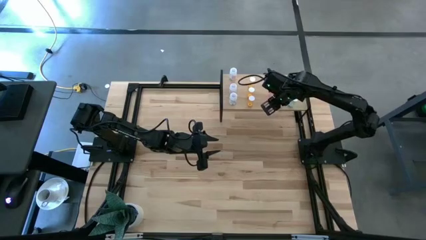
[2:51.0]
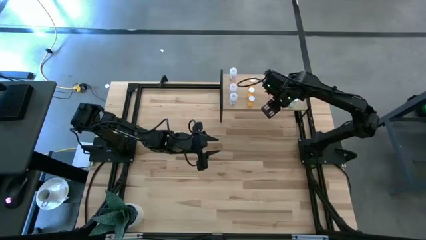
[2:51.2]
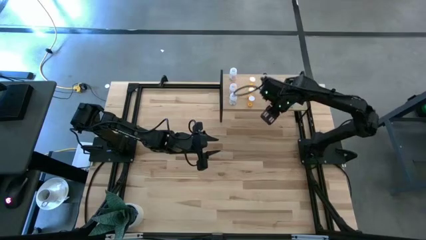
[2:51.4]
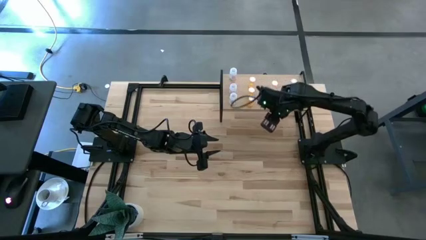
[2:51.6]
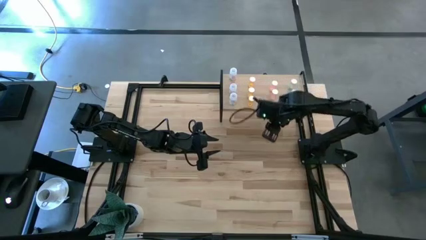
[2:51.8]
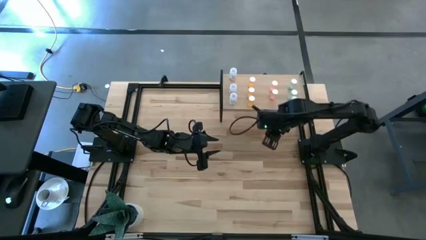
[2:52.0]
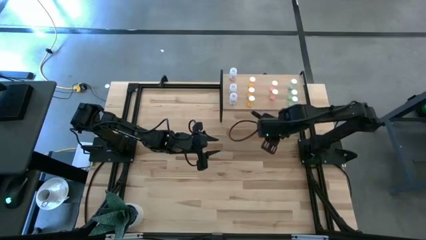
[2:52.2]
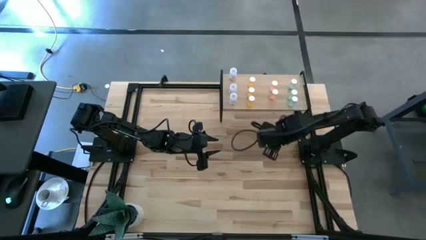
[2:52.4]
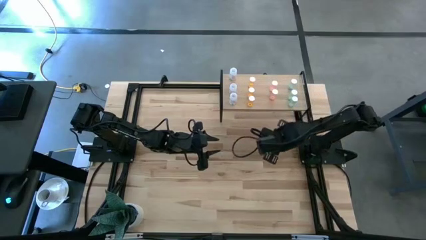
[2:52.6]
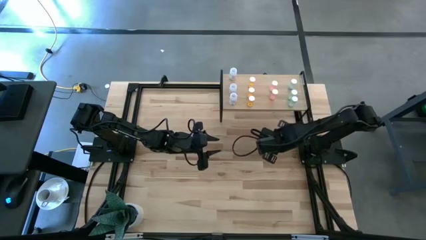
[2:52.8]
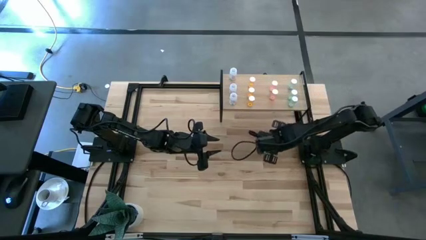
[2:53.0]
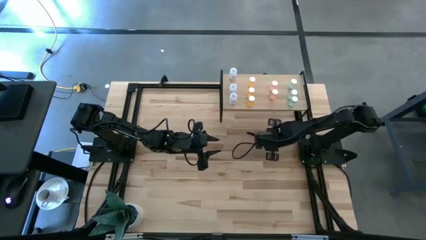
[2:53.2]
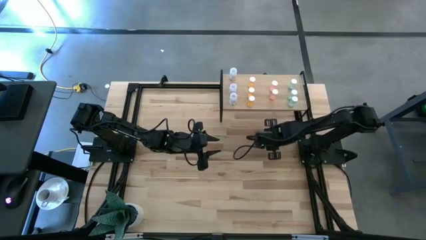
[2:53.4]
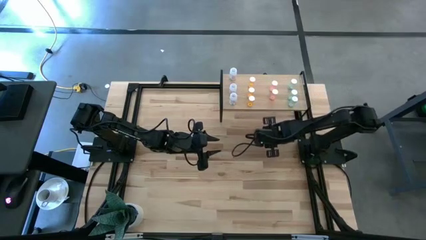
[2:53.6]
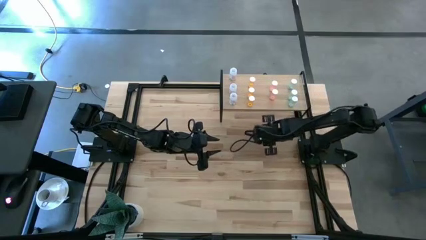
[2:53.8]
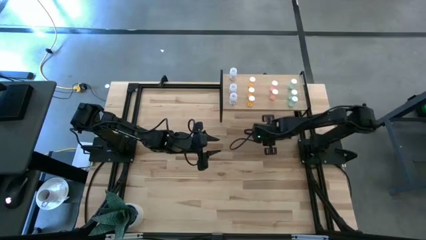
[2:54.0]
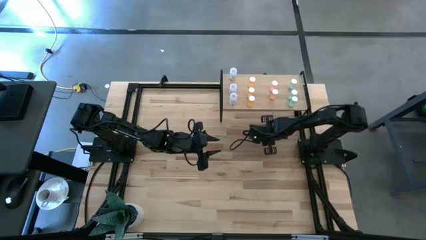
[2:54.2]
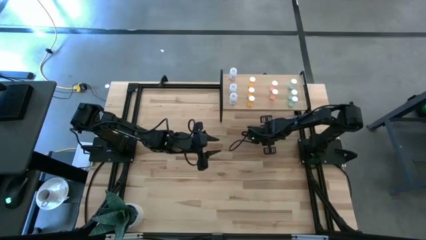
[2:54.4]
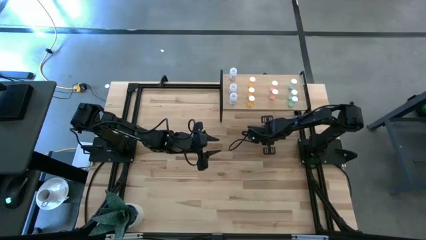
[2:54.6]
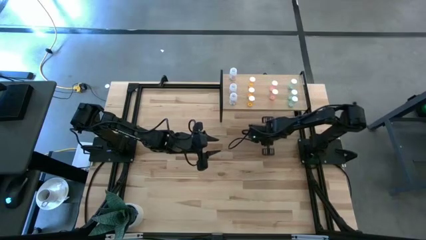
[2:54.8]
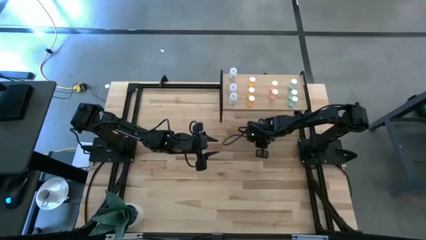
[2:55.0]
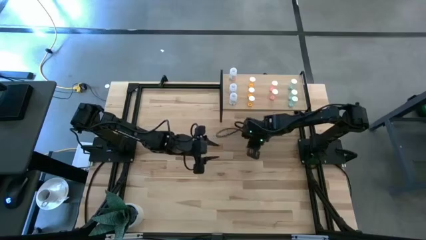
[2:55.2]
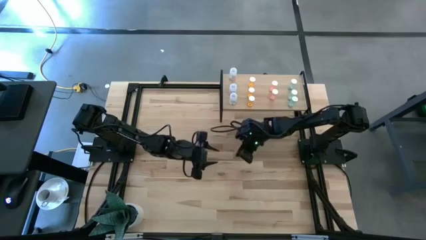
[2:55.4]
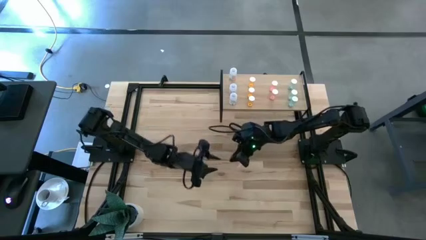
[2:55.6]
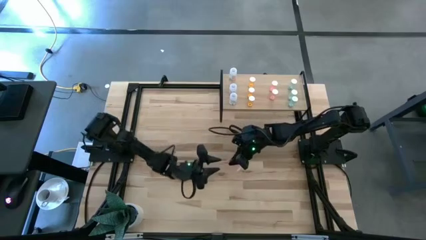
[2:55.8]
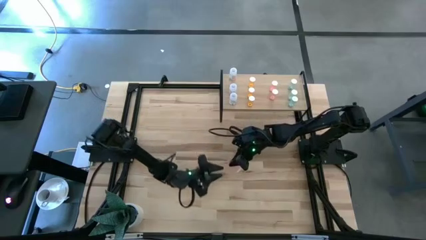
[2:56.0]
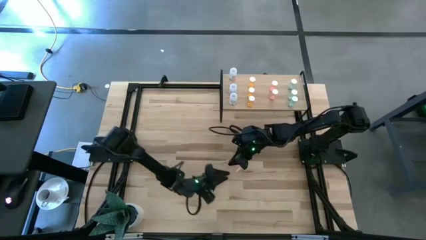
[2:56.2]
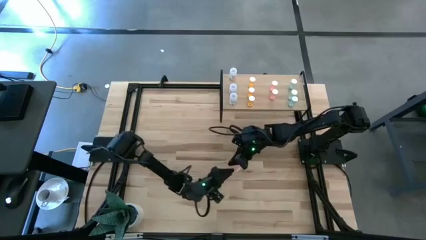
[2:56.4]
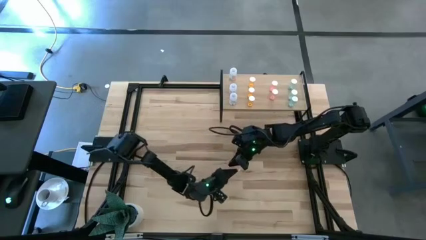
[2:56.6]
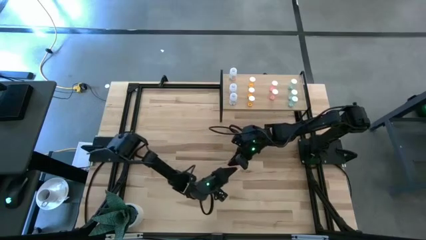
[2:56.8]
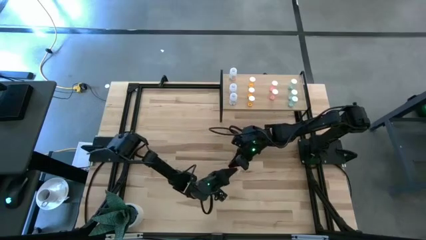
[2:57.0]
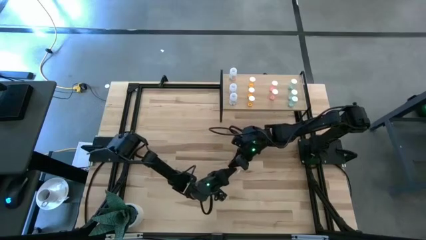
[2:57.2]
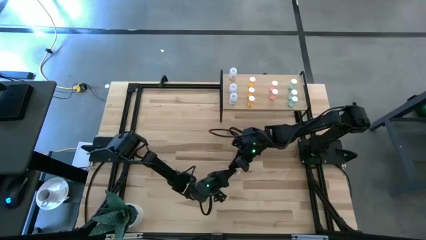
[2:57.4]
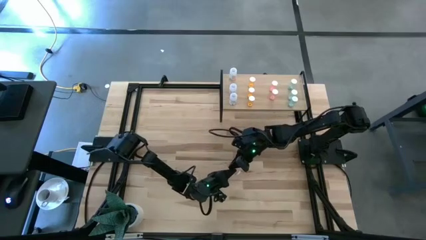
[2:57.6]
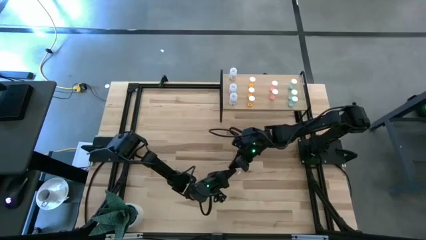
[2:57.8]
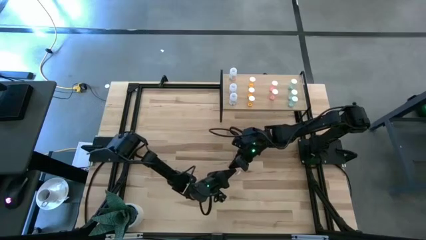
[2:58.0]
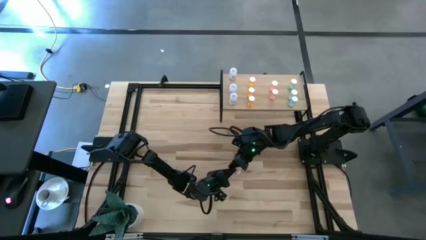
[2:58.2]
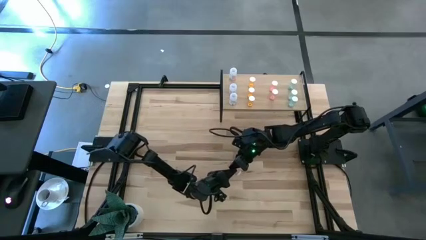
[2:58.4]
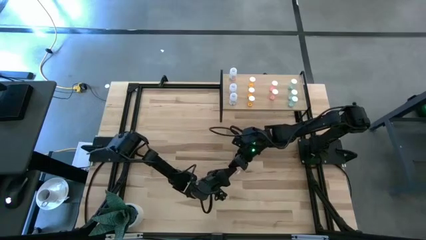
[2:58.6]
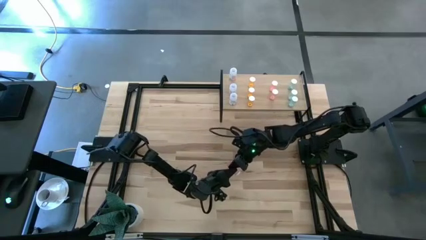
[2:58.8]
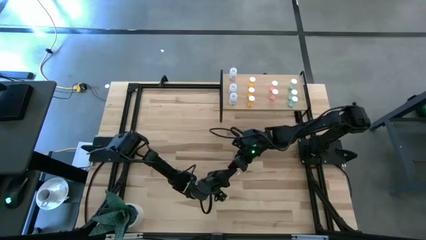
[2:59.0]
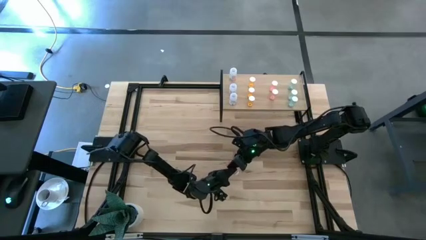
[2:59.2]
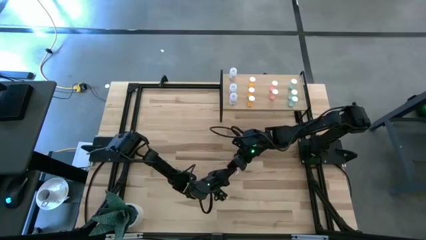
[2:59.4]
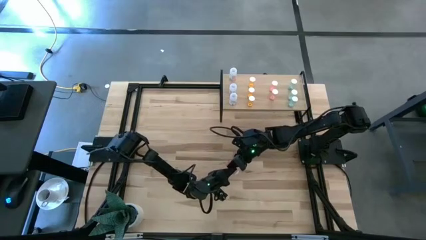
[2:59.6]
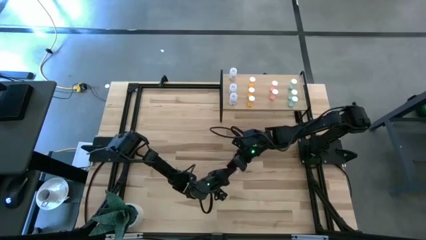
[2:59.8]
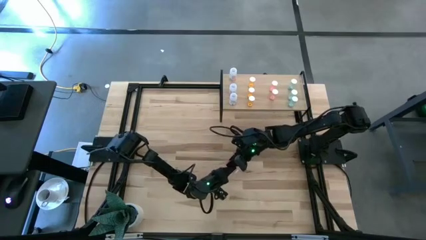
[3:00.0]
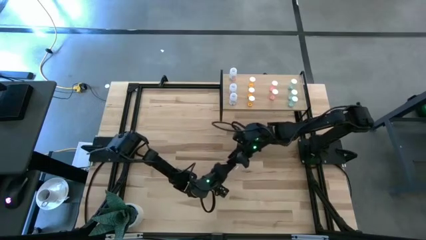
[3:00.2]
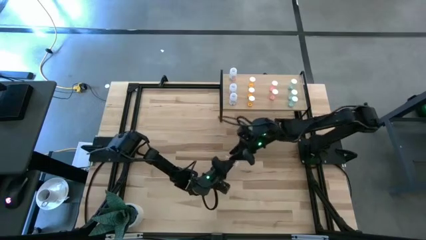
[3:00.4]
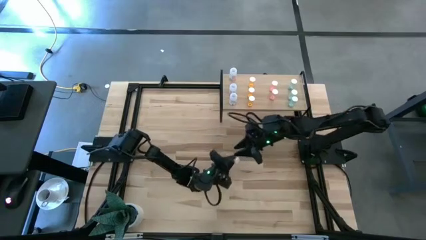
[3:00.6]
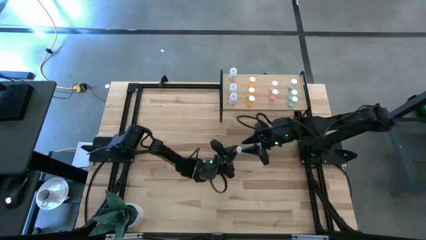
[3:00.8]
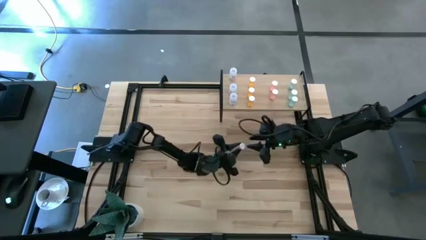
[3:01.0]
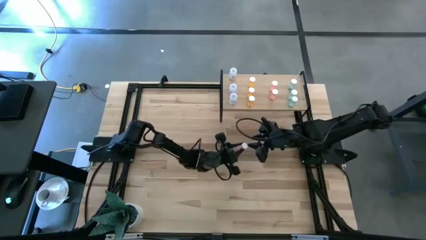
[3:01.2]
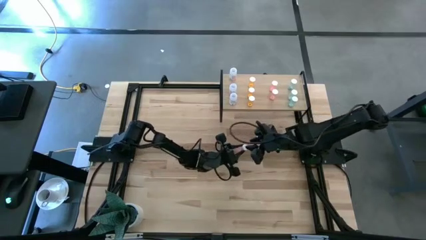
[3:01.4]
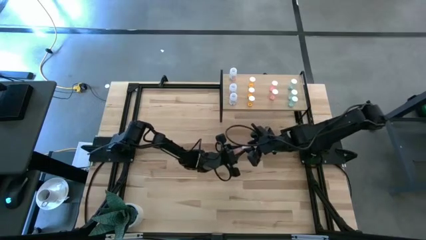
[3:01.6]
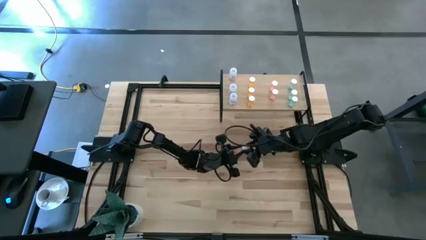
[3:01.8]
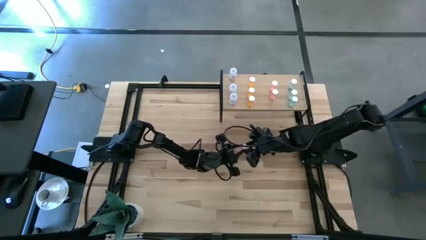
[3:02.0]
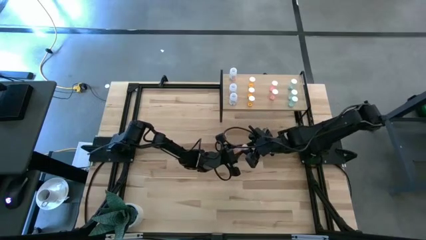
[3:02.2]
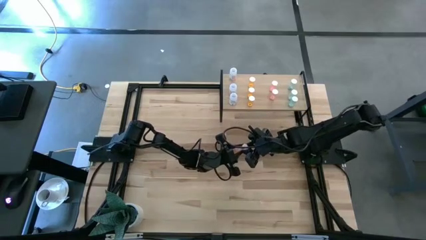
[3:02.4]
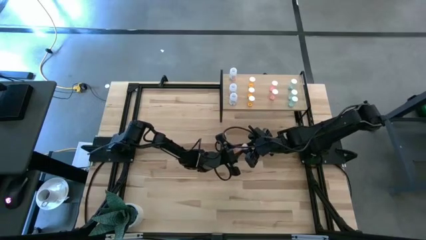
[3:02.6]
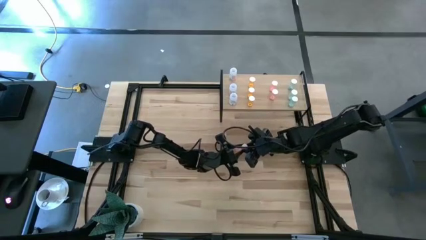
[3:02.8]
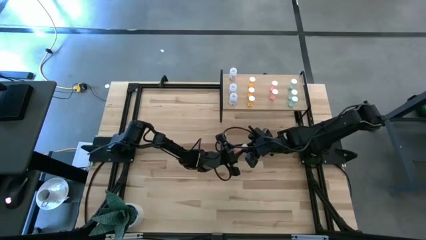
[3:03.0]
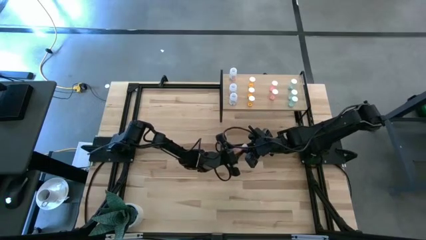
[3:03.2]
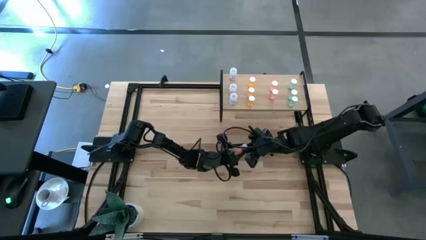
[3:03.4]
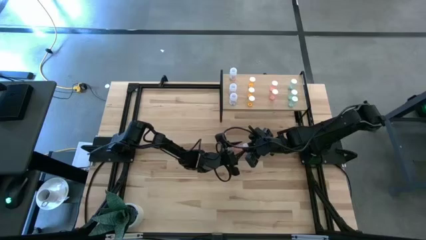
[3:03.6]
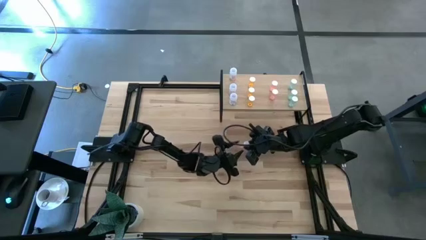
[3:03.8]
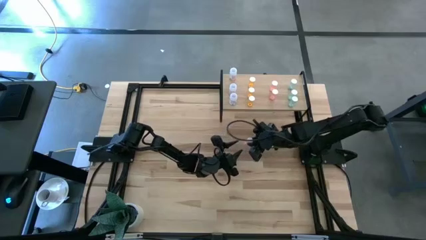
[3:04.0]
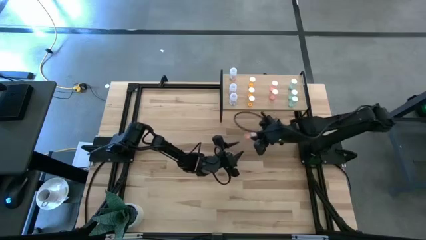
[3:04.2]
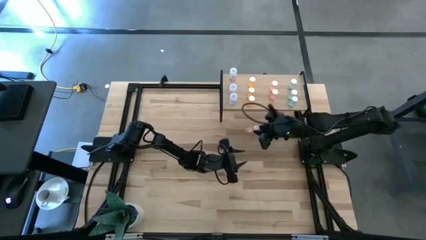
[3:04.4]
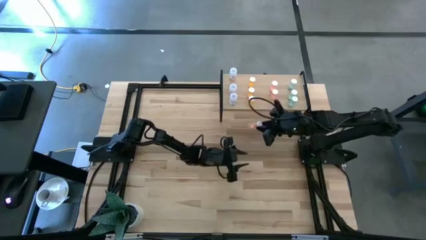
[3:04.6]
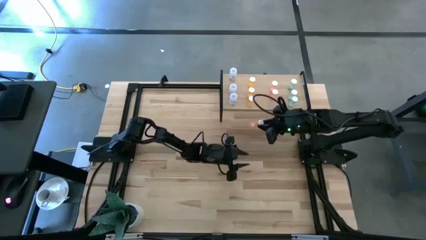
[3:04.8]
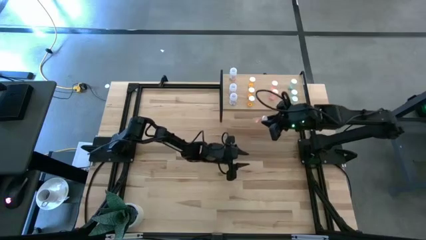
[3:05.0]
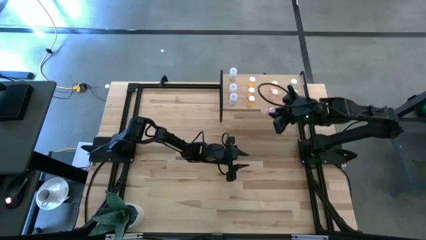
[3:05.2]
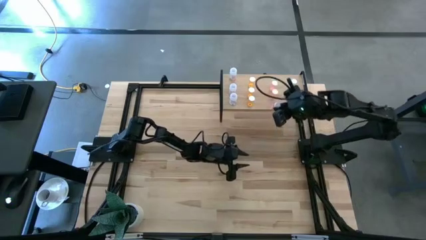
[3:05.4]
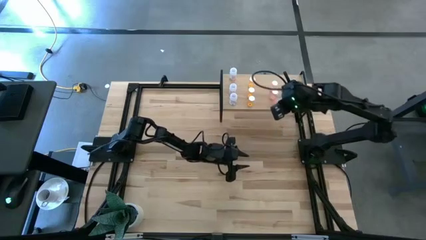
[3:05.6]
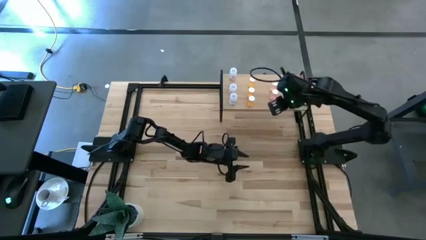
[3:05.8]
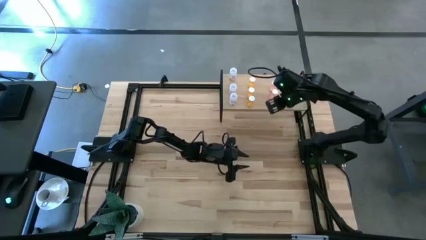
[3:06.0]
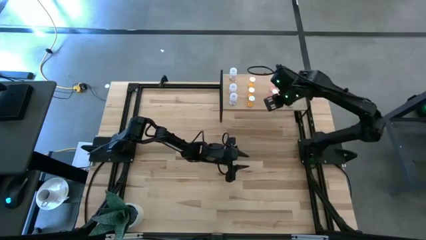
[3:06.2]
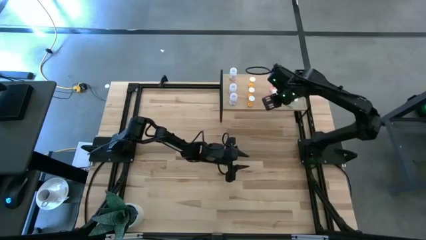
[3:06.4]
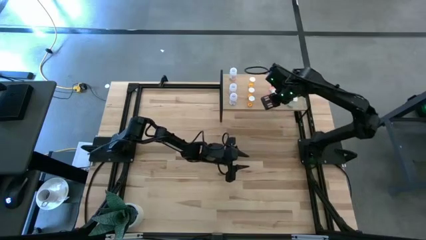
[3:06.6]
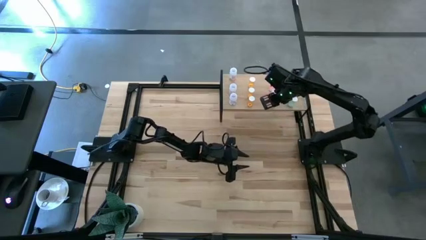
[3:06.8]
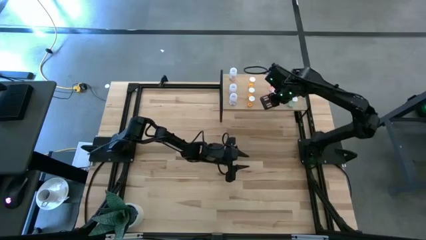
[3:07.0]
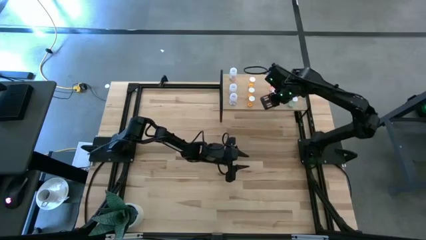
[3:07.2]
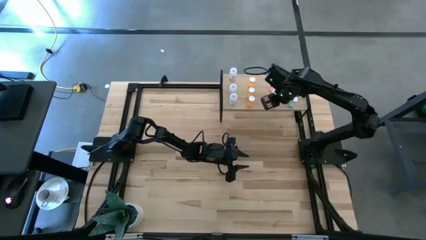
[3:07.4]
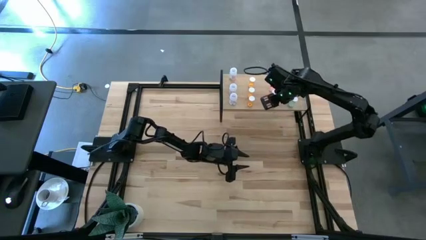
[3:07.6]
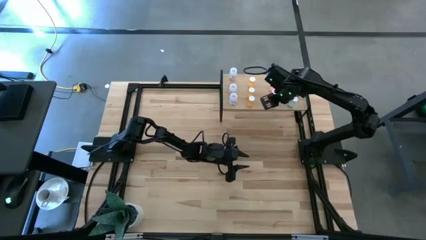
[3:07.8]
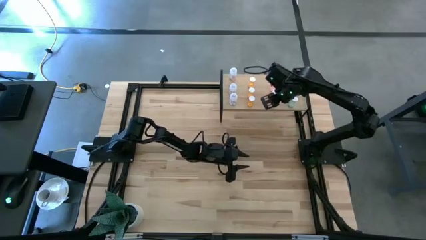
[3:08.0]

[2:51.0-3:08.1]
Task: Pick and place medicine bottles onto shelf by color
Put the pink pill bottle on the shelf aligned with the other pink pill bottle
